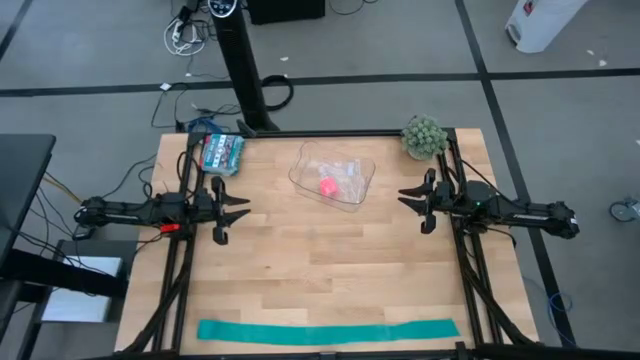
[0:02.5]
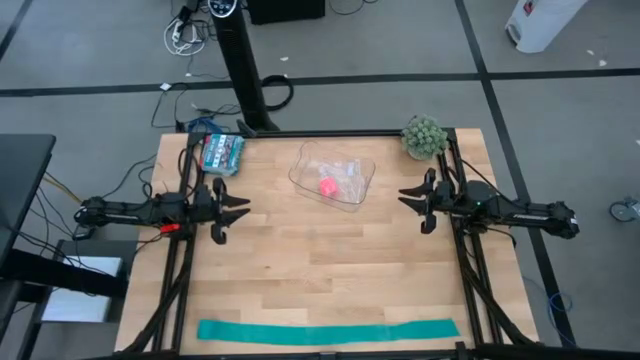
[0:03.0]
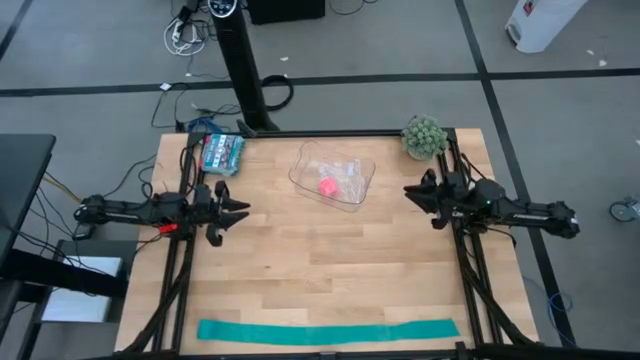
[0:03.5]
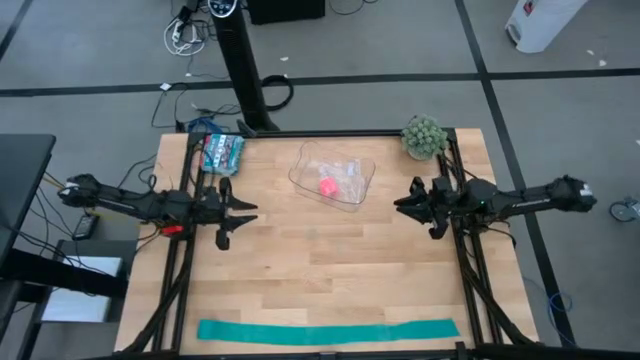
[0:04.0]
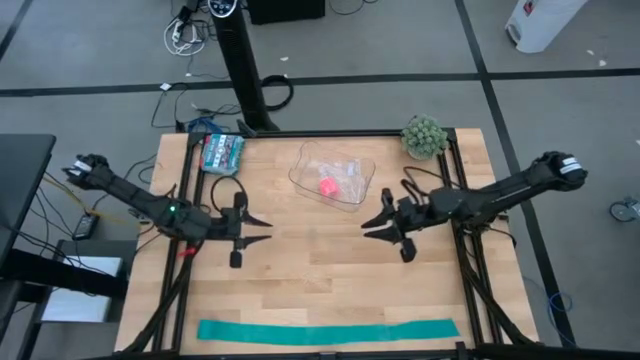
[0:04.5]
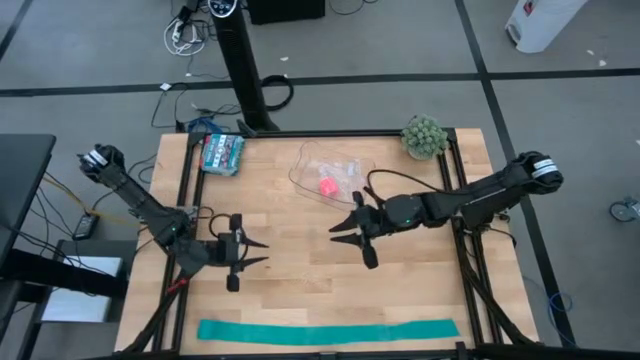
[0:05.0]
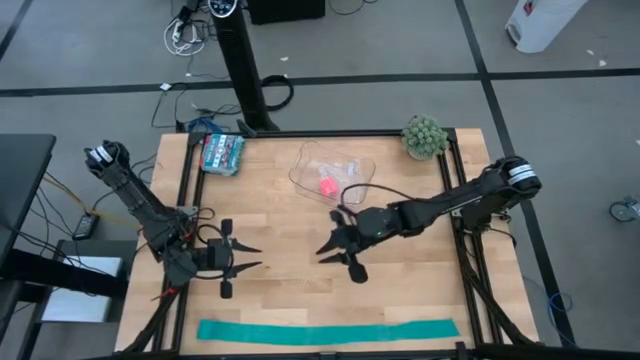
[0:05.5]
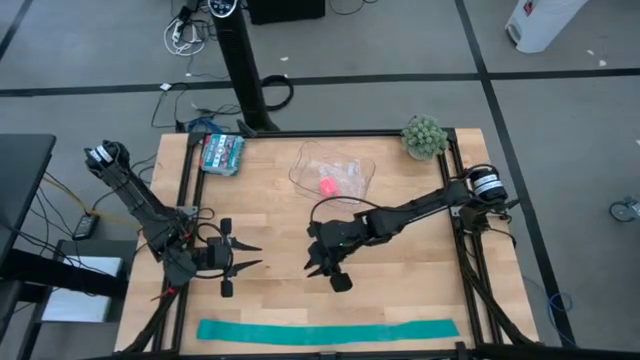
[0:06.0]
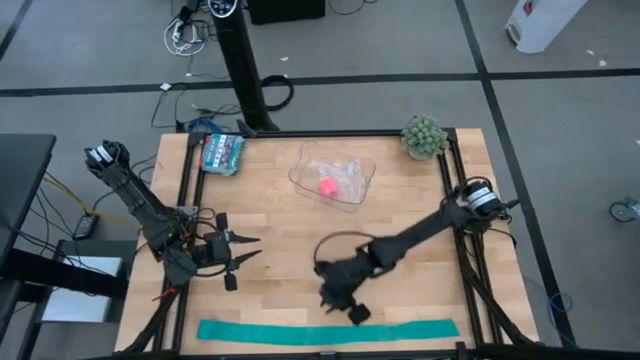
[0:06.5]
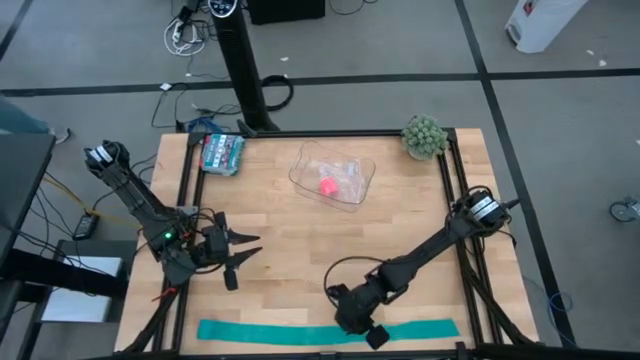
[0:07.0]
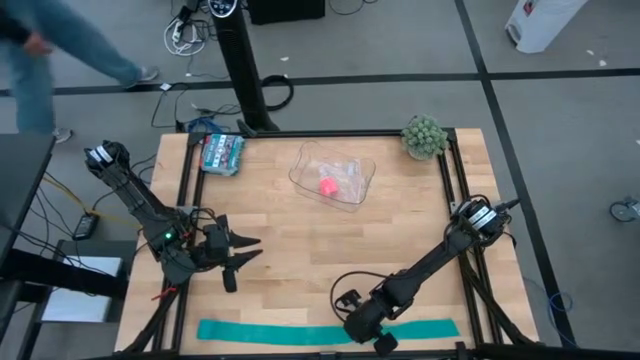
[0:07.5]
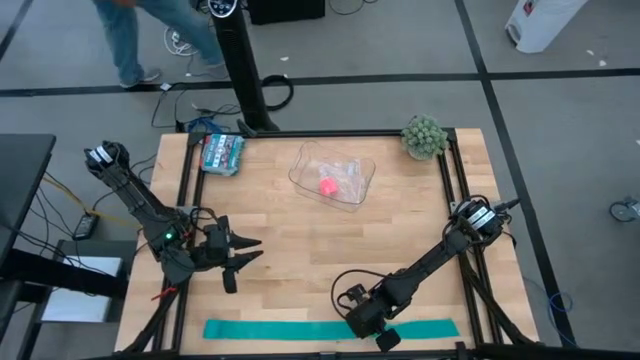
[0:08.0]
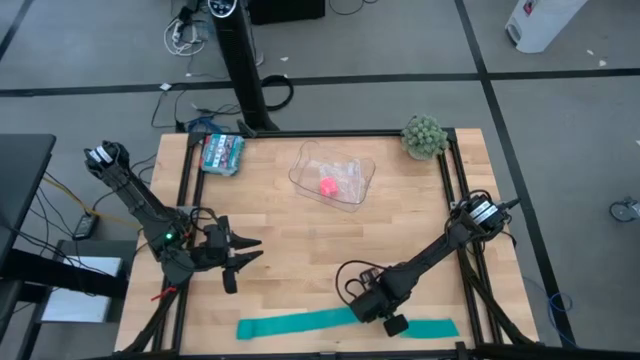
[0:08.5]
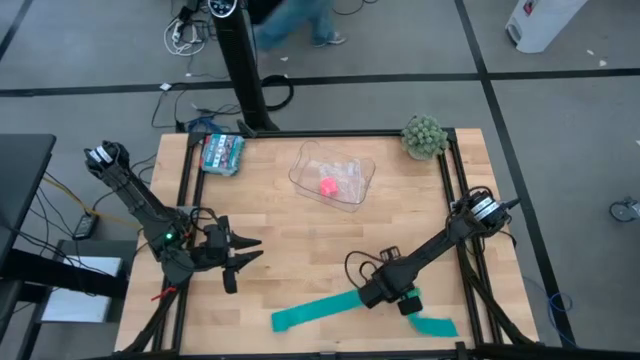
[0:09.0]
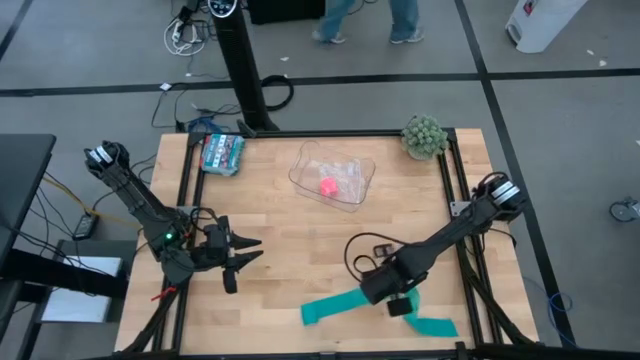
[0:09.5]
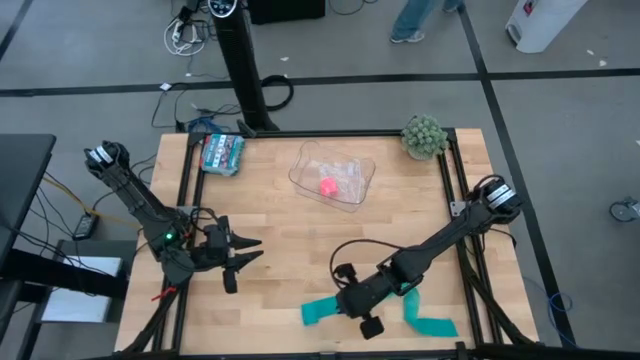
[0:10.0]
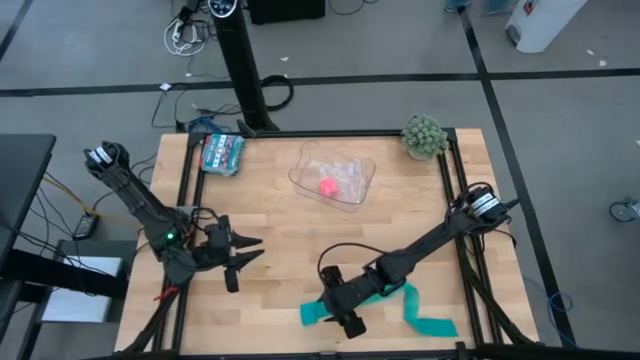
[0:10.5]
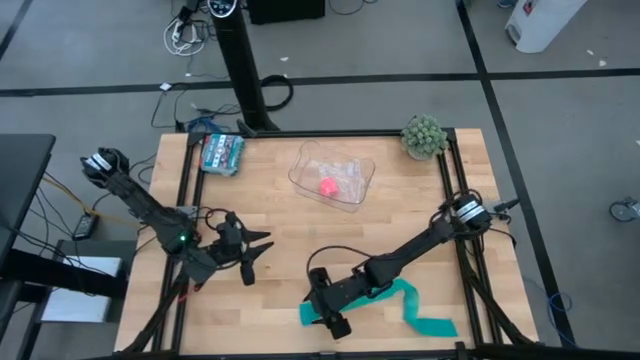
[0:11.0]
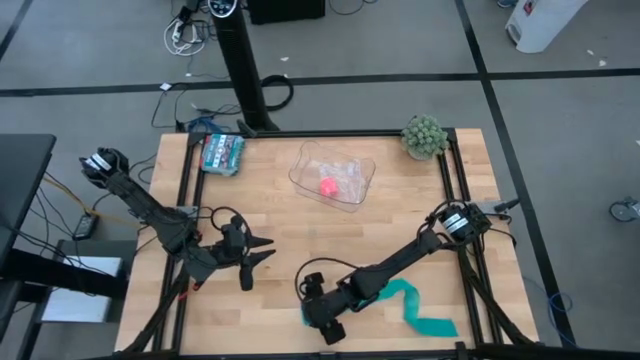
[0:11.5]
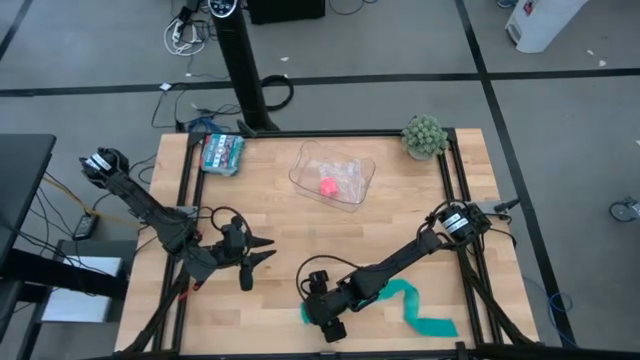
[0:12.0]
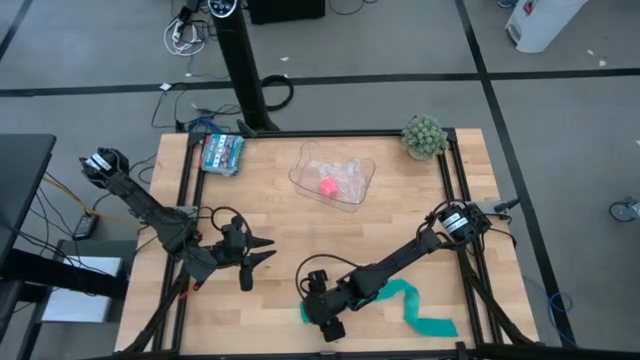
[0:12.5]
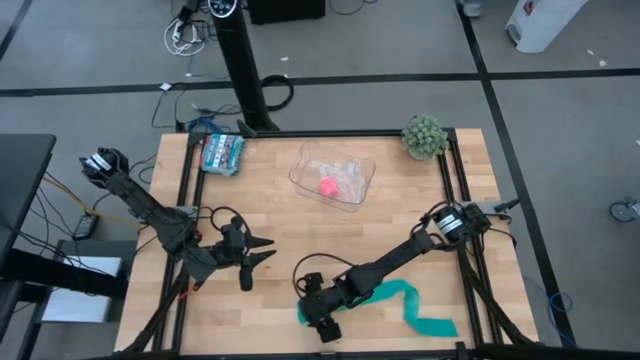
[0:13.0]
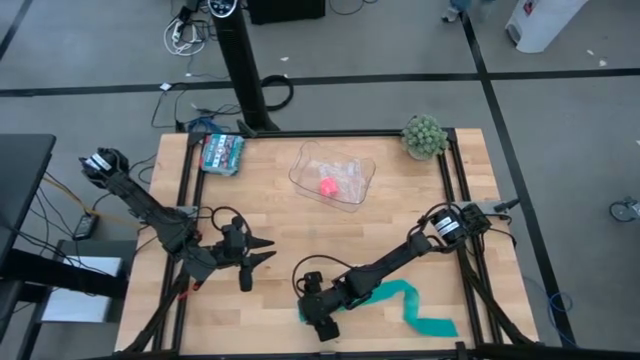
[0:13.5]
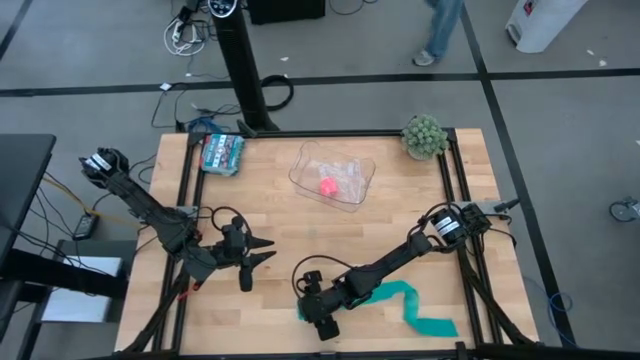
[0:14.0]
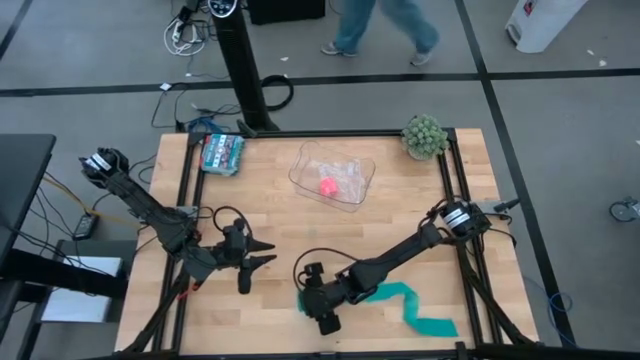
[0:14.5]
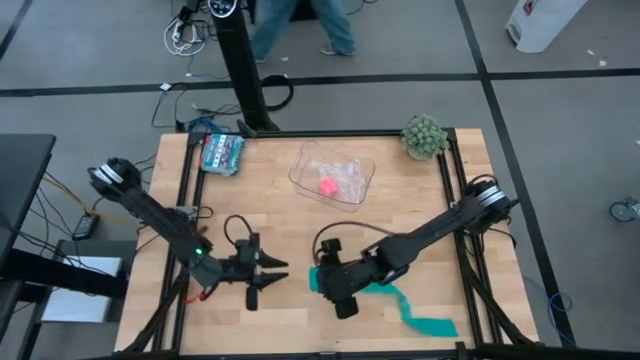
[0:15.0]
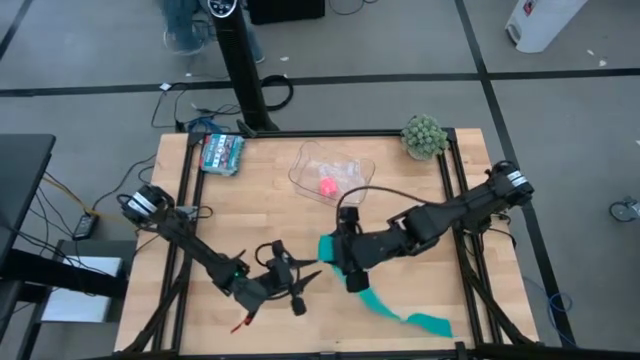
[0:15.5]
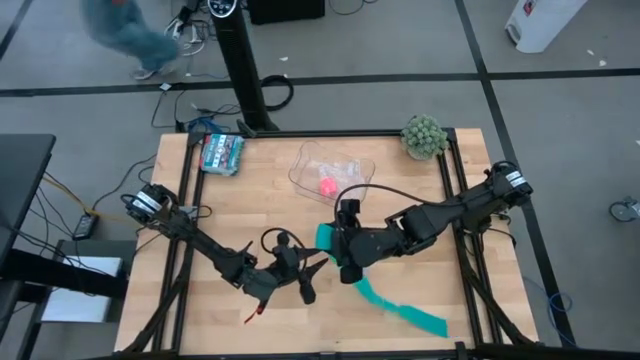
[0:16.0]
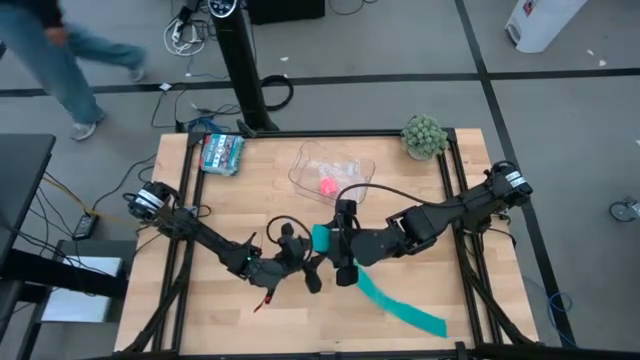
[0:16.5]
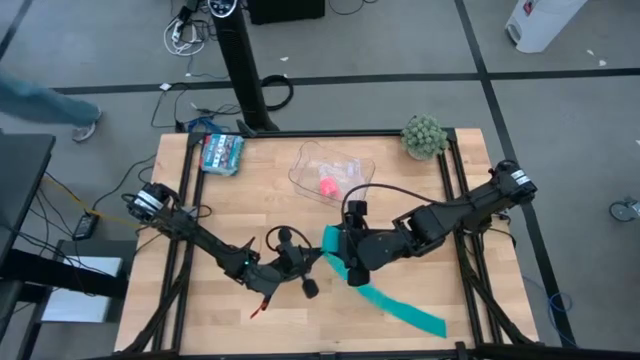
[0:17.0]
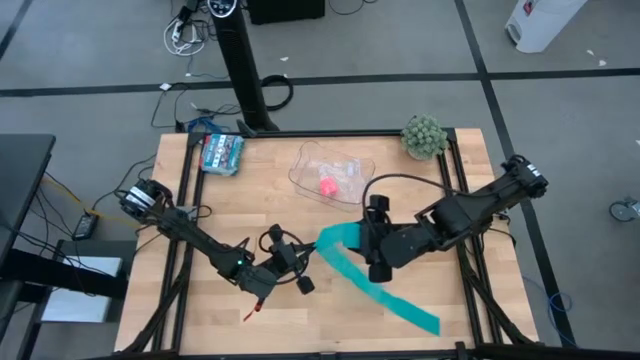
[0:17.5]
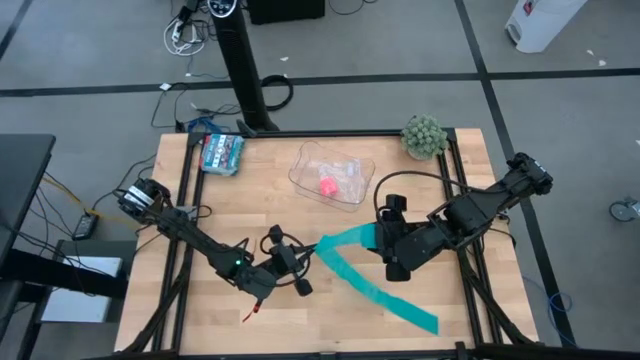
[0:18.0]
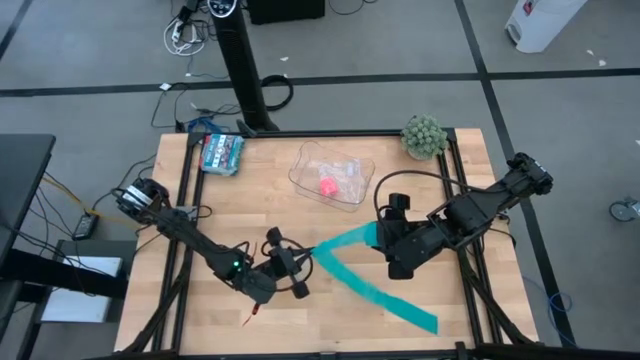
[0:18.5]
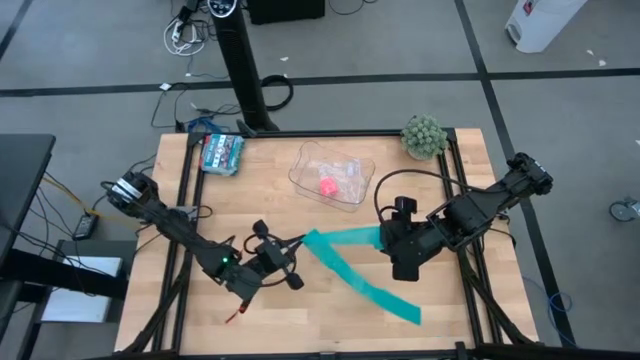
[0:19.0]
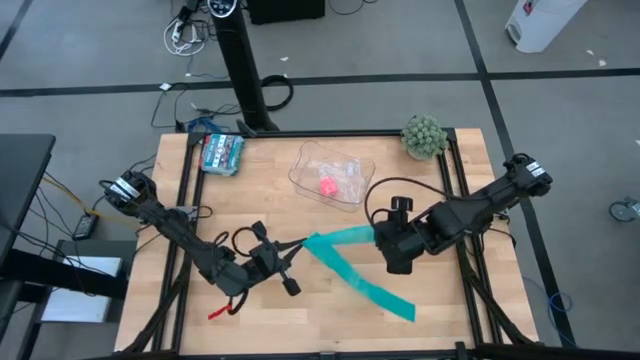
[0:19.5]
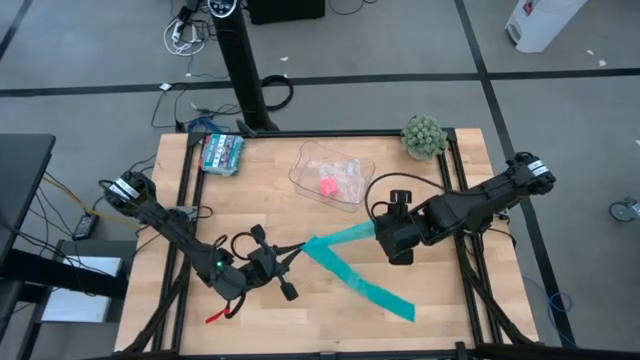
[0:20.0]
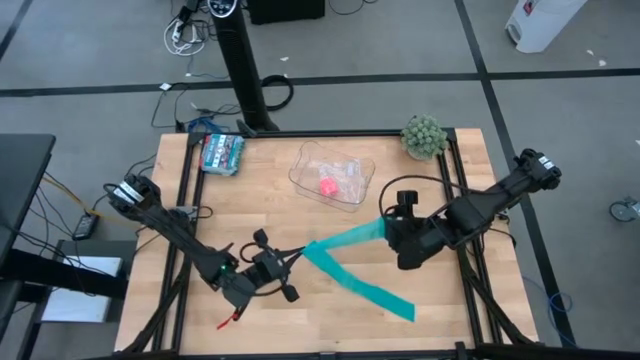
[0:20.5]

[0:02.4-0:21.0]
Task: Roll bandage
Roll the blue bandage
